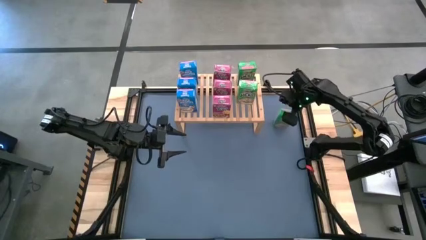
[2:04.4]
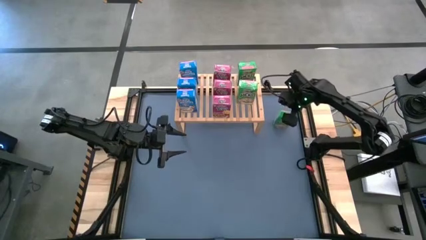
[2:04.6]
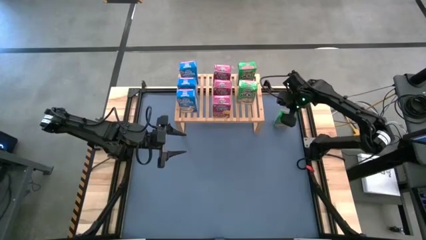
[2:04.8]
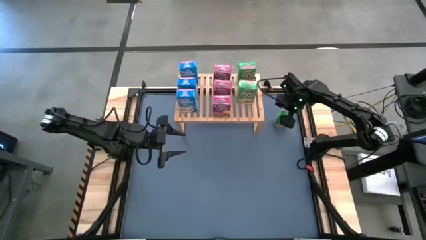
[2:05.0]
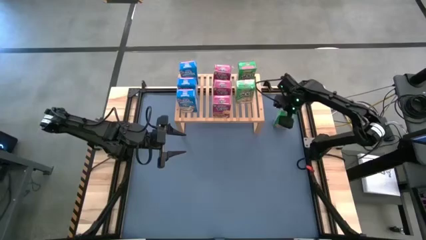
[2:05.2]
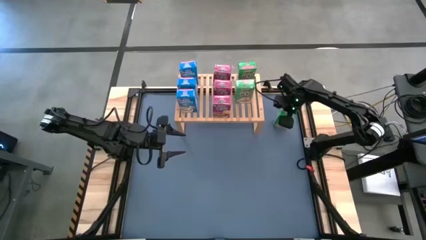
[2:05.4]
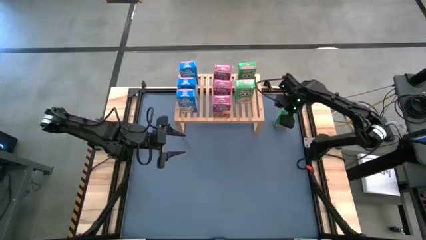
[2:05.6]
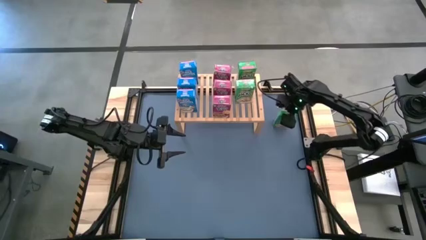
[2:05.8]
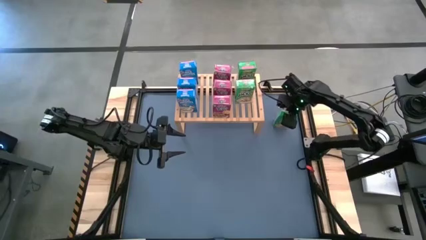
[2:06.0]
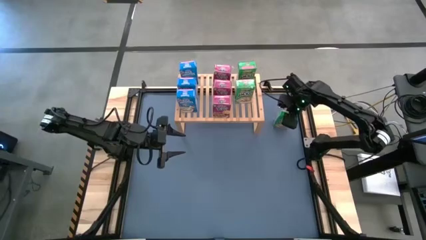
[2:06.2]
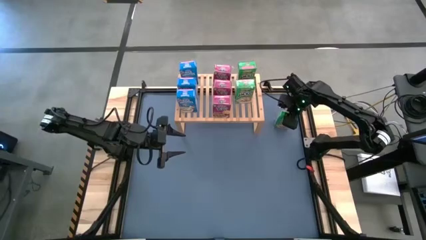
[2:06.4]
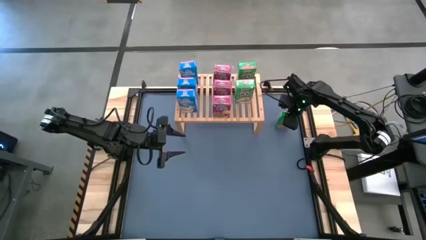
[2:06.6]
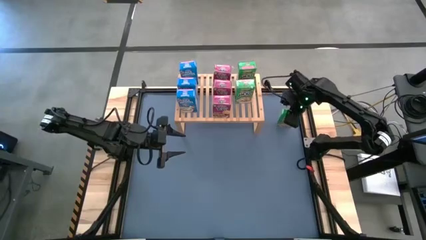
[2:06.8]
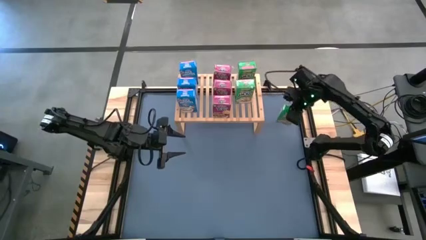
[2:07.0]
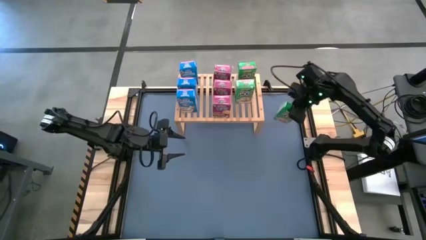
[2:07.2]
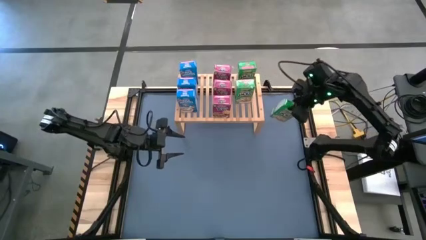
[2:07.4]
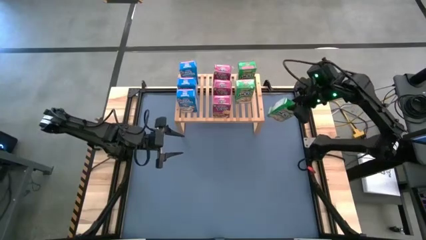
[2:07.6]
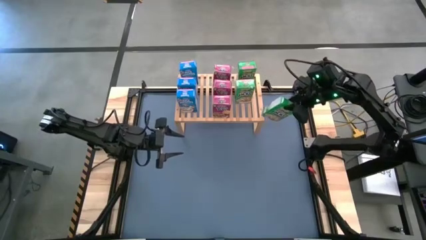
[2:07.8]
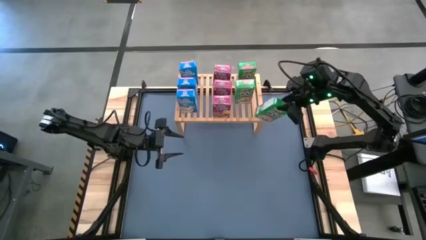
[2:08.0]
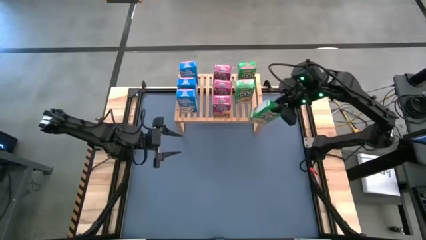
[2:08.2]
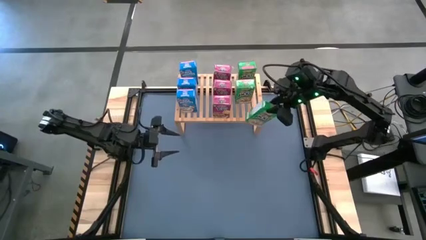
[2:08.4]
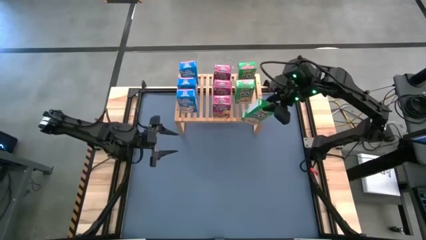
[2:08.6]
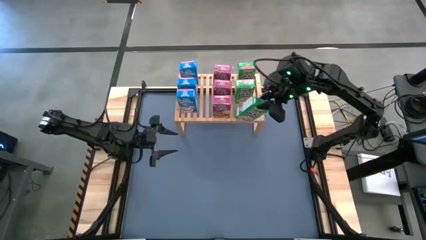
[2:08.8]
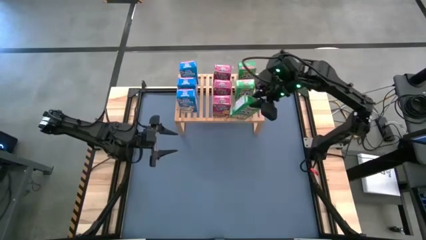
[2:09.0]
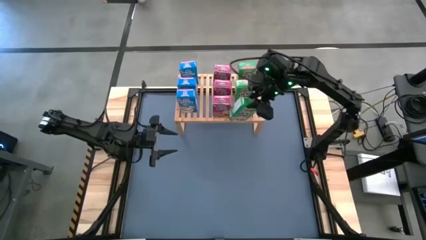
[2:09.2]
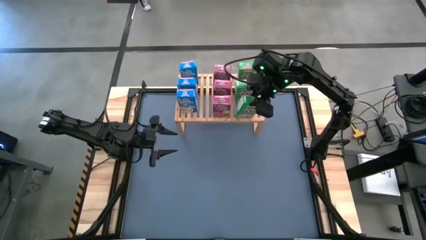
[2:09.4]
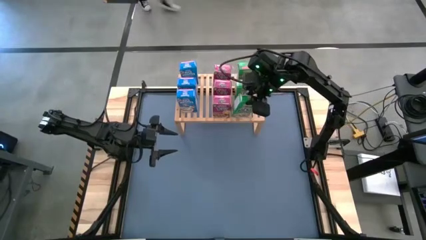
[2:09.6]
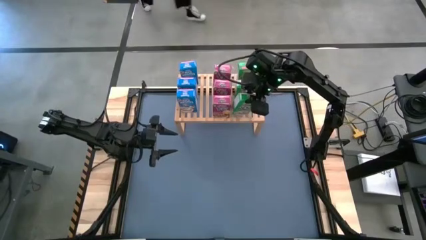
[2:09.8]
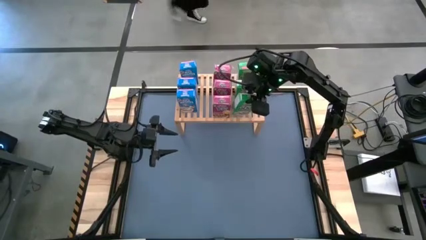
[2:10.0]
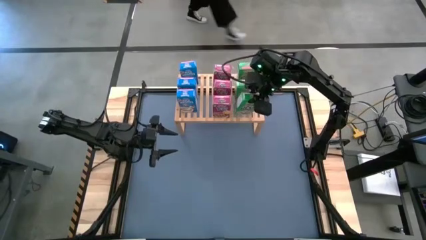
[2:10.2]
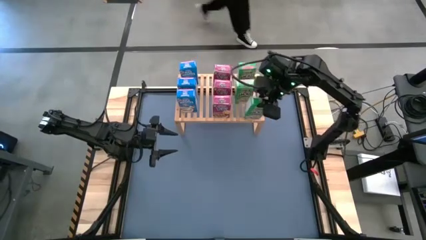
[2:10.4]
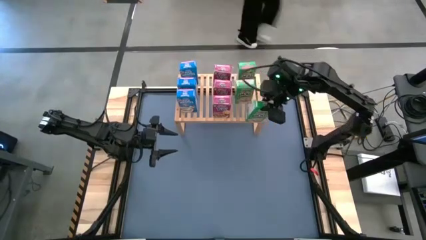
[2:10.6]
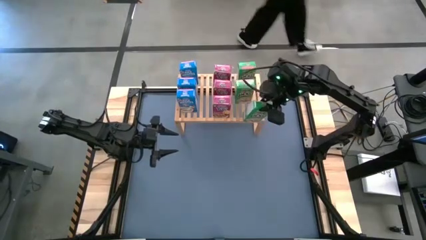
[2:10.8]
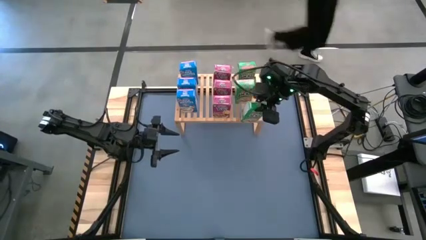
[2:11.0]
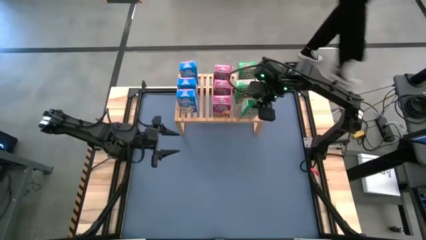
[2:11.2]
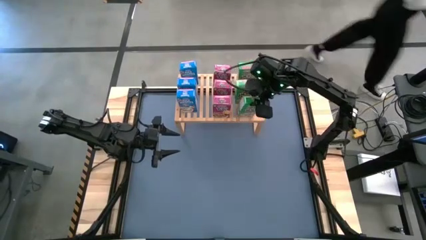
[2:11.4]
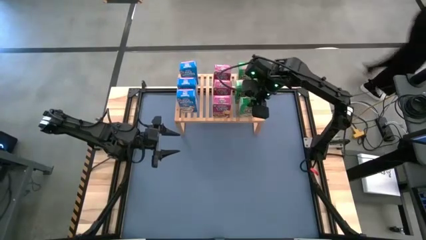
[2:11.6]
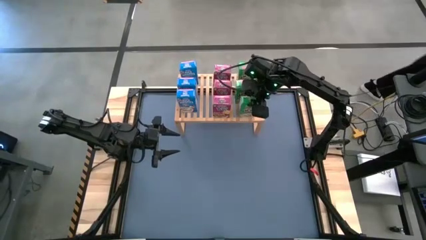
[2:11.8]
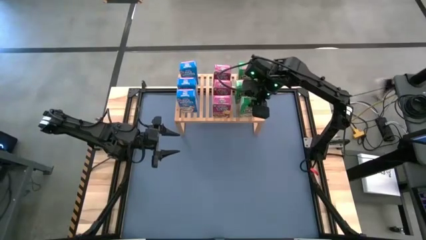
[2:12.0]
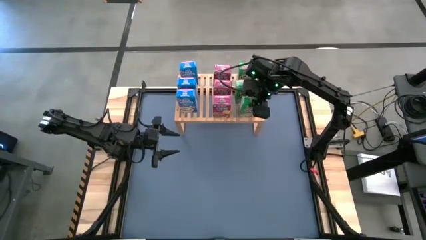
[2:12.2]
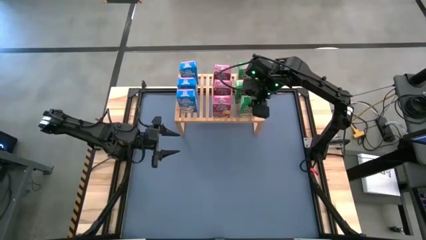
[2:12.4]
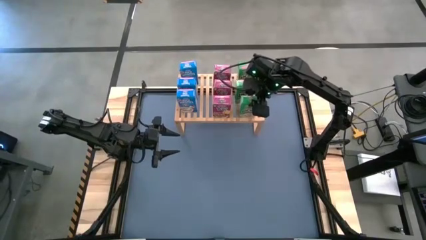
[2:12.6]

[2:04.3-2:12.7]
Task: Stack cereal on shelf
Put the green cereal box on the shelf aligned with the other green cereal boxes

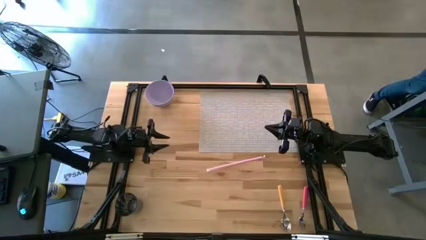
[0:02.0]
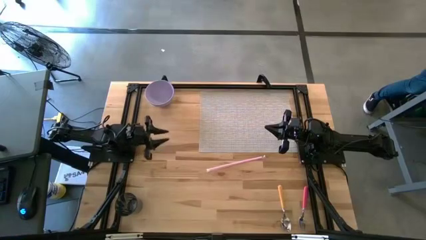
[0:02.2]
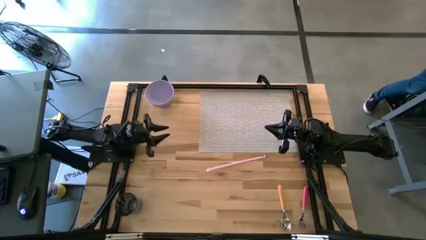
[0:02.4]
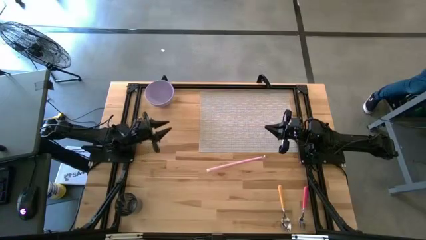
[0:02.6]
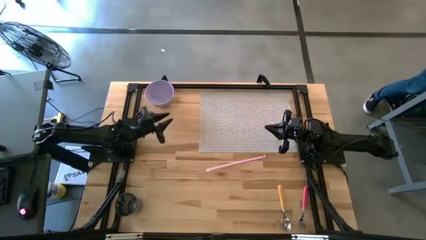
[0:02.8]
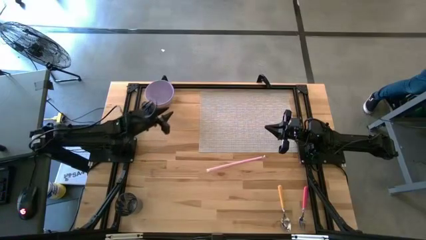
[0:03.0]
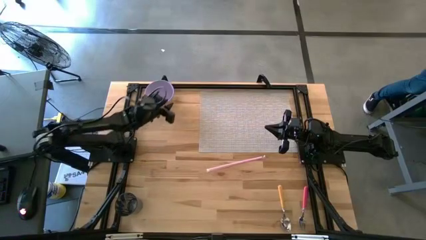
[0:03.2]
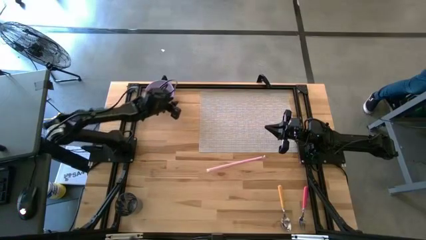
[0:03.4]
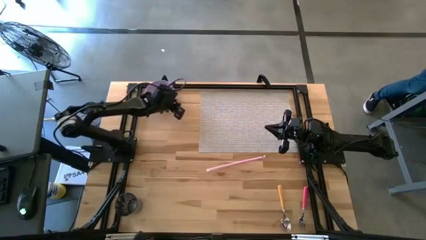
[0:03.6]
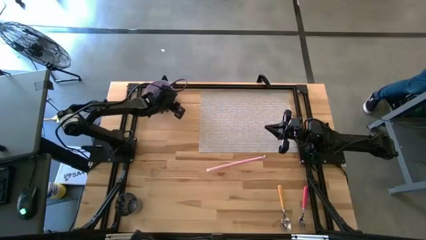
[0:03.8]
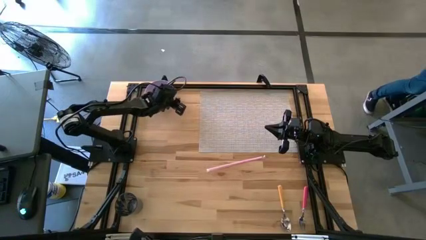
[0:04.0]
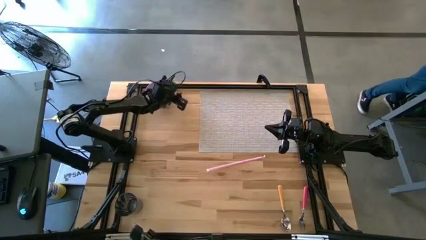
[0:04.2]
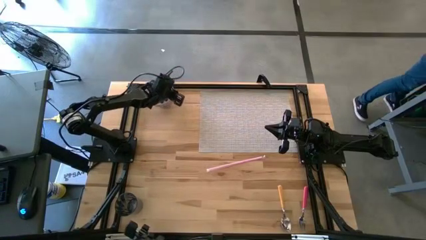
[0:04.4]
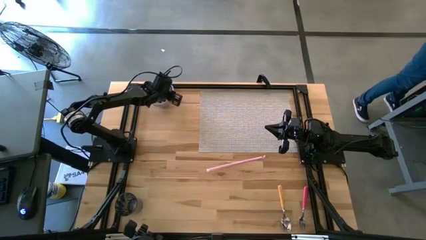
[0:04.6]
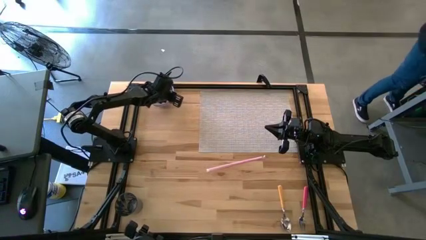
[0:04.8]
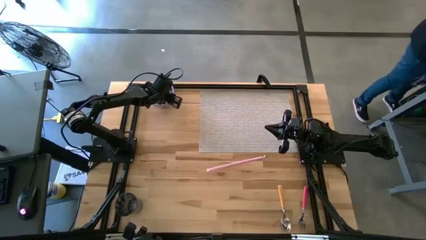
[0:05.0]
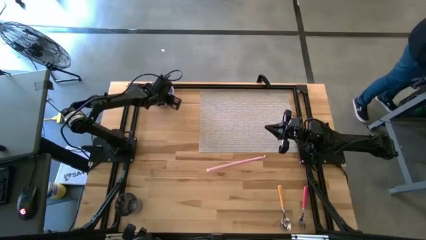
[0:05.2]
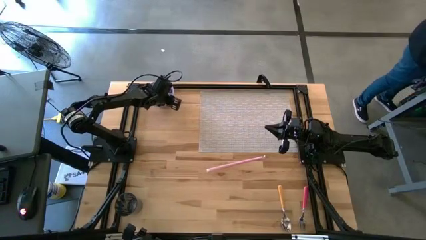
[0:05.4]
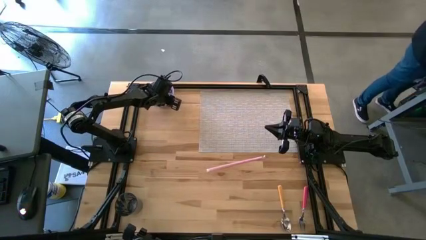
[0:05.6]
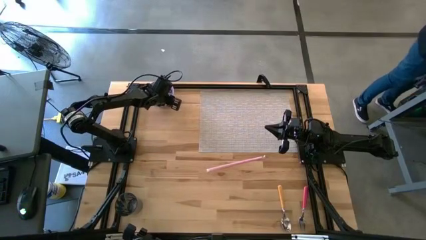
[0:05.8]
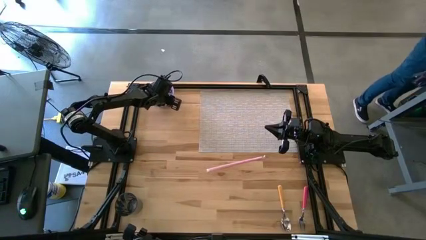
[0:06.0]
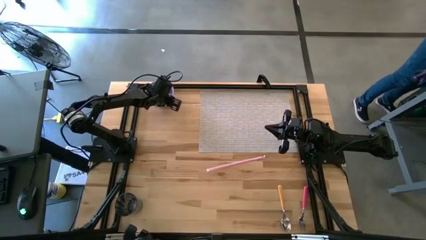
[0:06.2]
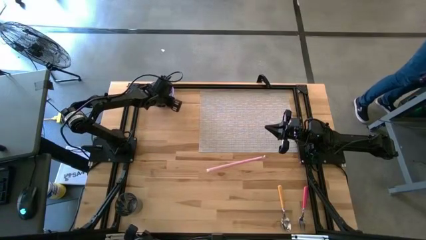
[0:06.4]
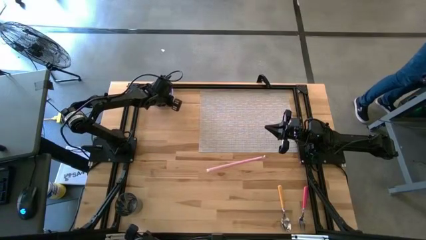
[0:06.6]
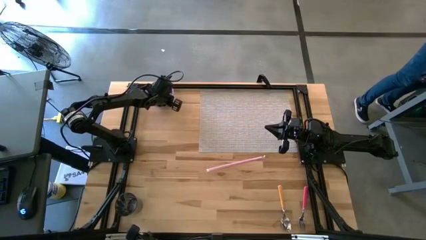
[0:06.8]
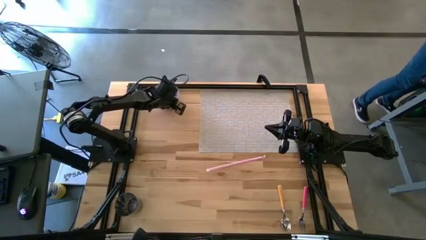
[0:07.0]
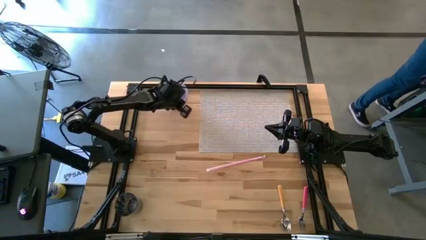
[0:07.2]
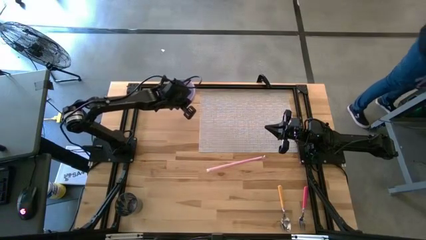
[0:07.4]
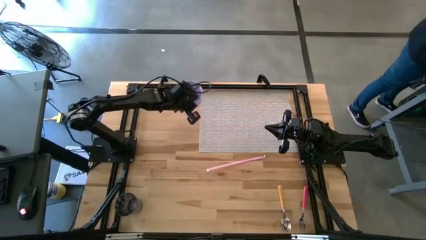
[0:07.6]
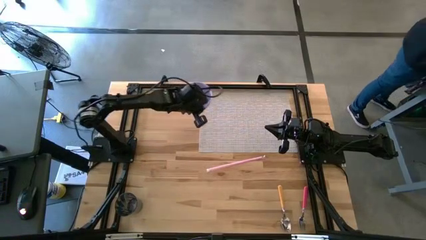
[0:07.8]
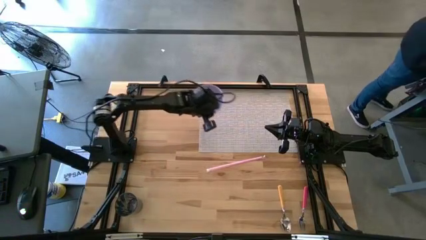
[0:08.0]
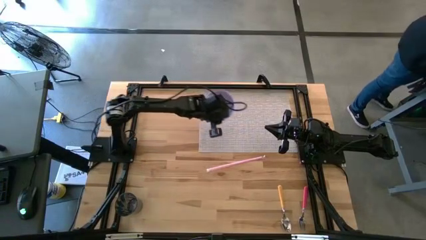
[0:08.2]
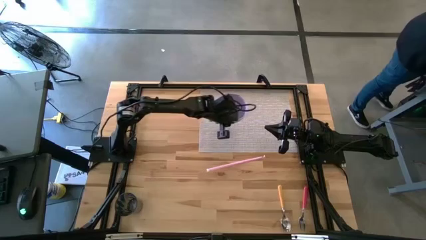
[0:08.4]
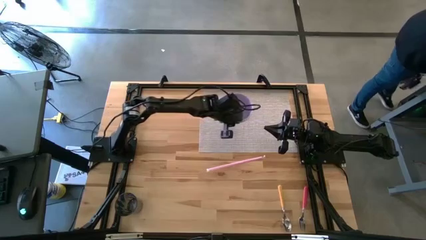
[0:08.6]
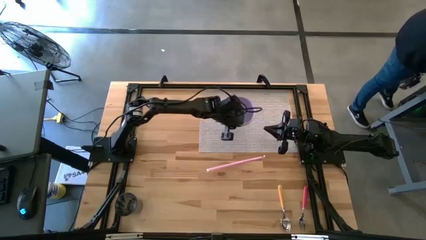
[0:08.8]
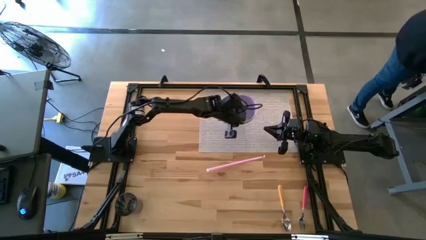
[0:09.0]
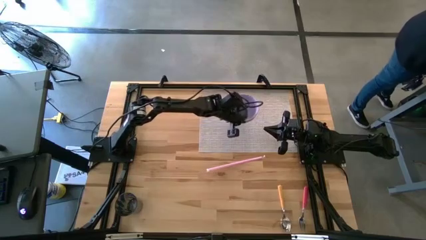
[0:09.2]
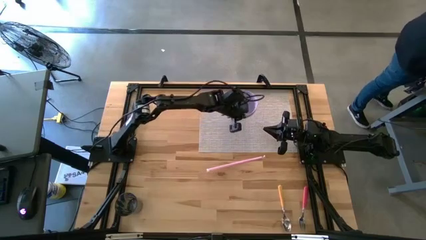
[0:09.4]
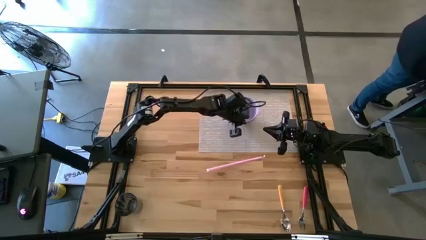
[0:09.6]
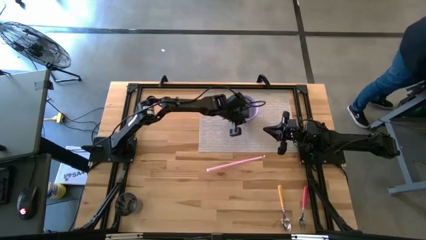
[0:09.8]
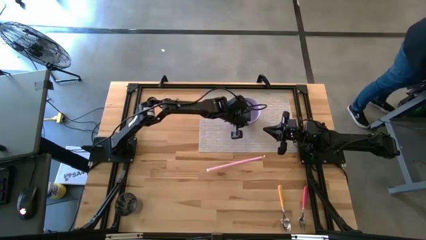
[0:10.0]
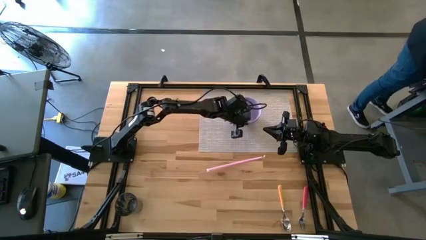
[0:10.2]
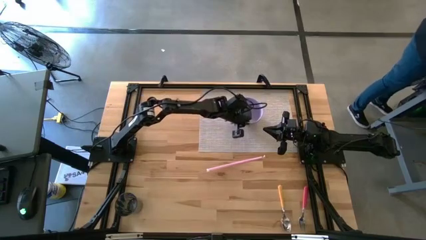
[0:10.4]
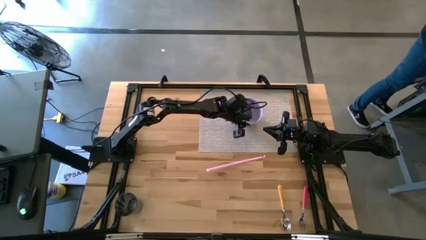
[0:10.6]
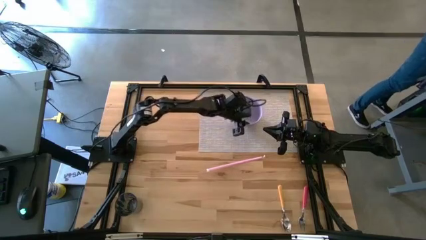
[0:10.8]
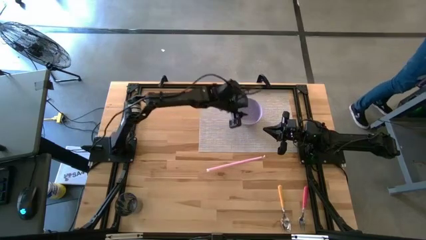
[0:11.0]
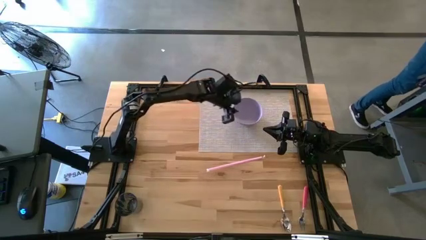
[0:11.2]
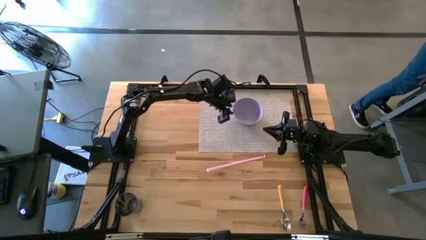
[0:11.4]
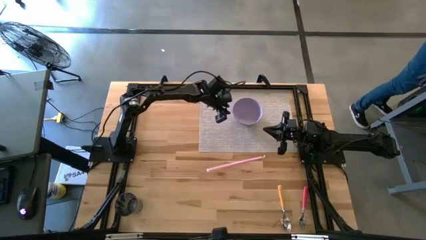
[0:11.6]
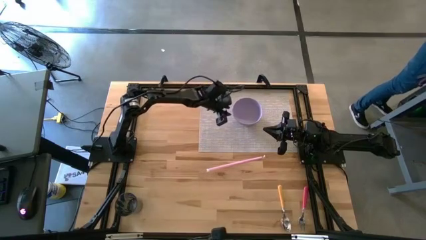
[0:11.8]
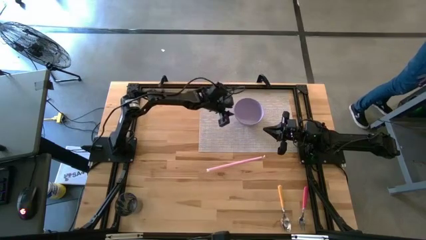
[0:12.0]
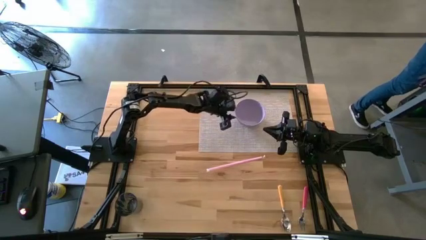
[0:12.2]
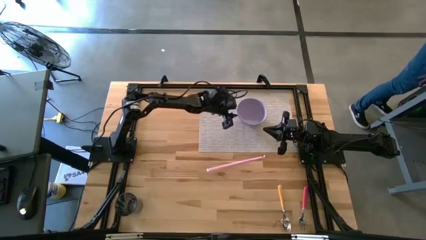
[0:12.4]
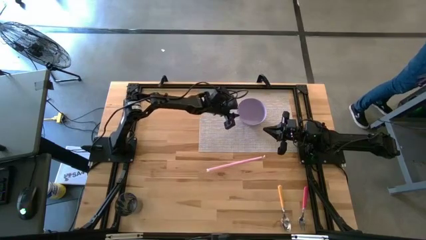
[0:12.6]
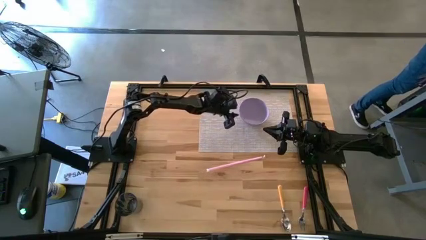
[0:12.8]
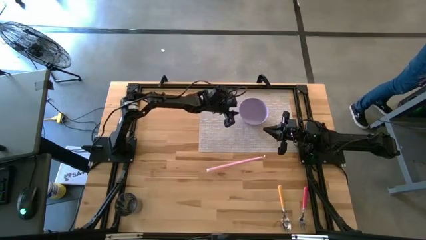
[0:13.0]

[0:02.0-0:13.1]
Task: Pick & Place Utensil
Put the violet bowl on the middle of the gray mat
